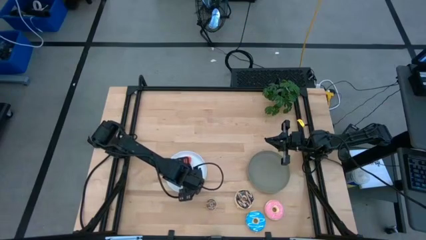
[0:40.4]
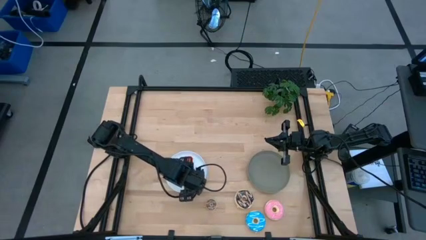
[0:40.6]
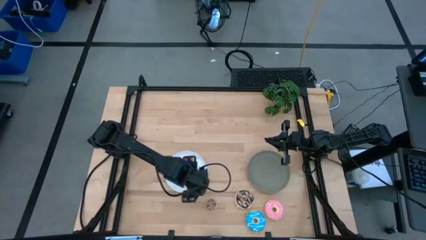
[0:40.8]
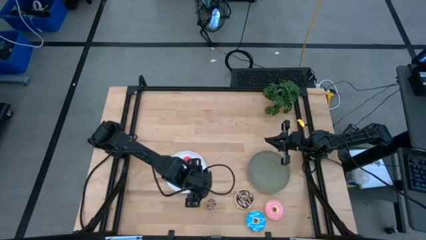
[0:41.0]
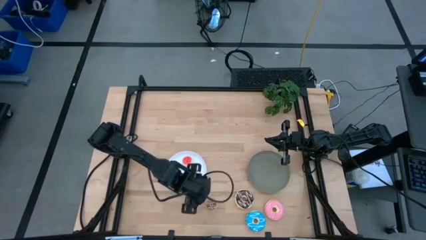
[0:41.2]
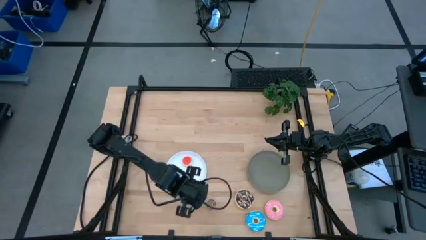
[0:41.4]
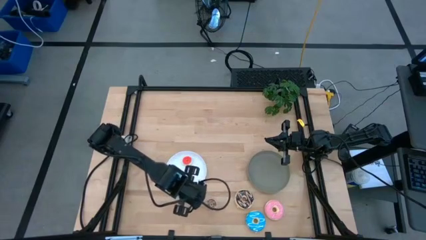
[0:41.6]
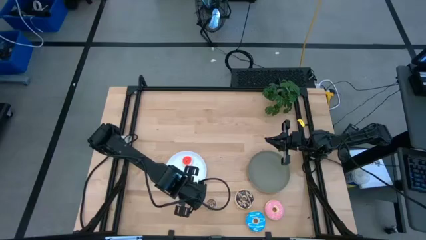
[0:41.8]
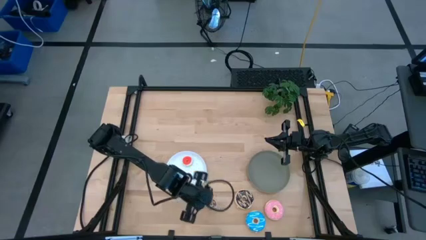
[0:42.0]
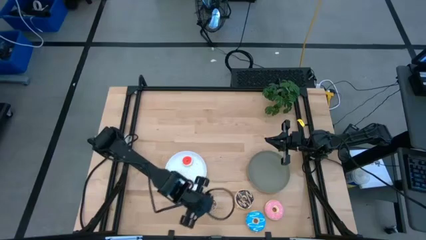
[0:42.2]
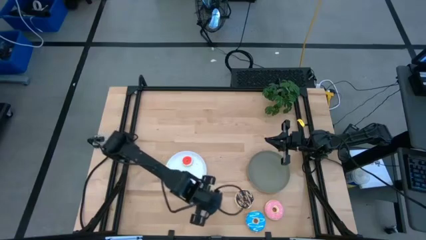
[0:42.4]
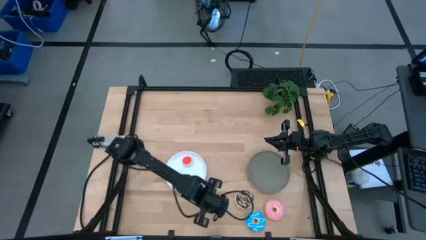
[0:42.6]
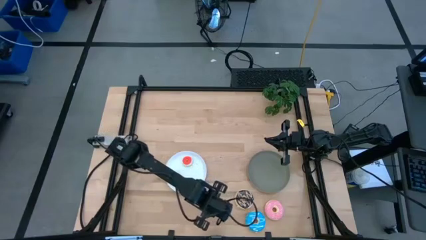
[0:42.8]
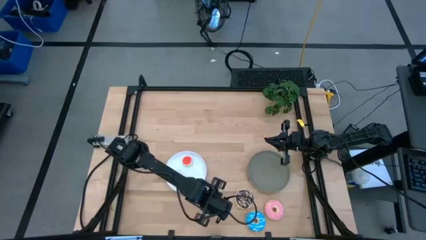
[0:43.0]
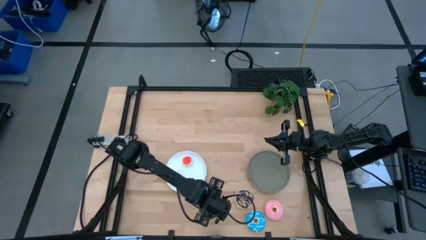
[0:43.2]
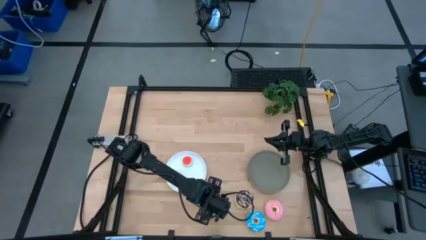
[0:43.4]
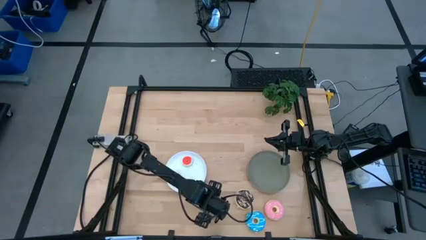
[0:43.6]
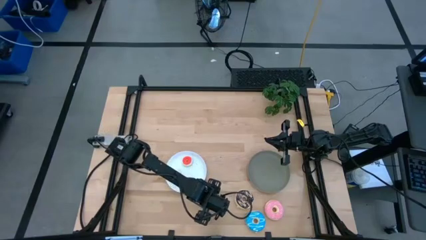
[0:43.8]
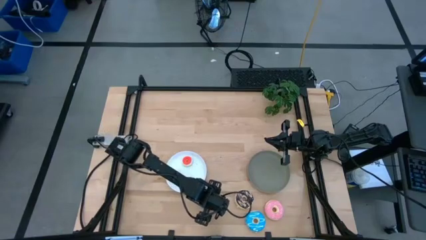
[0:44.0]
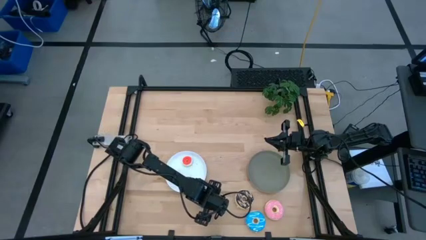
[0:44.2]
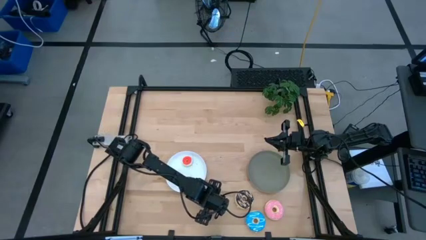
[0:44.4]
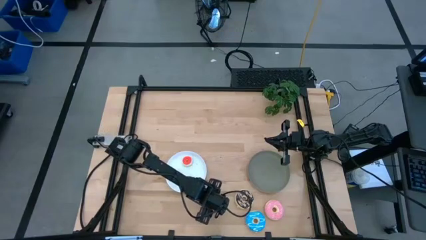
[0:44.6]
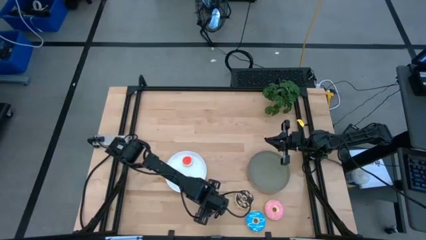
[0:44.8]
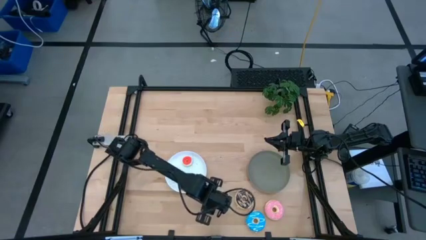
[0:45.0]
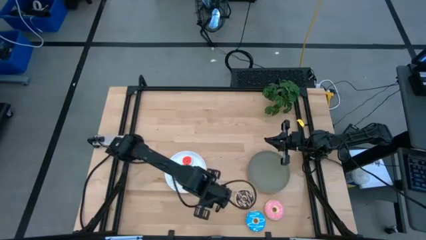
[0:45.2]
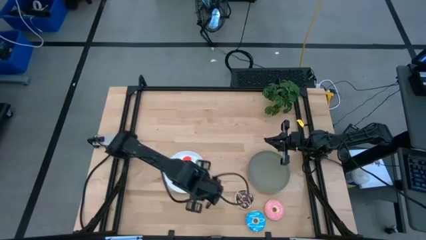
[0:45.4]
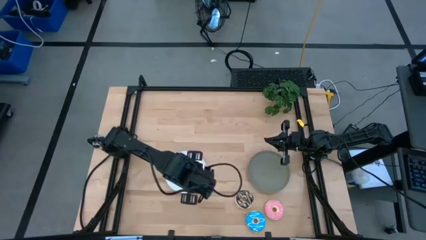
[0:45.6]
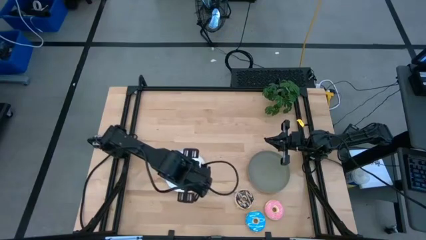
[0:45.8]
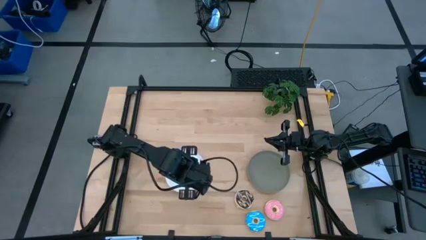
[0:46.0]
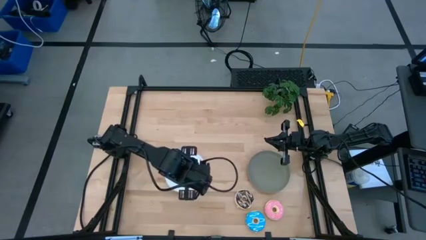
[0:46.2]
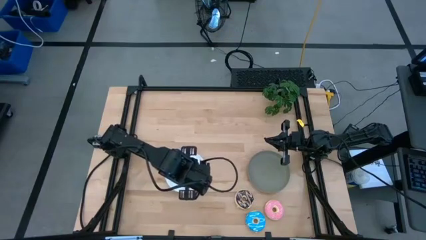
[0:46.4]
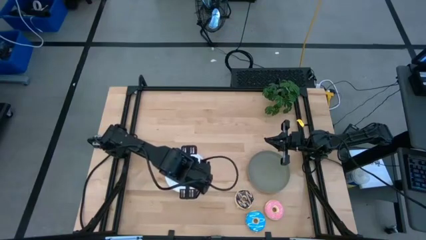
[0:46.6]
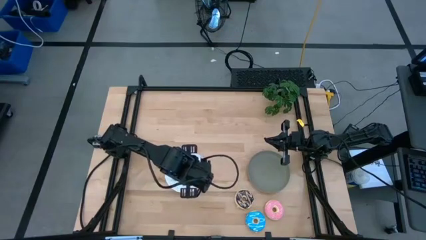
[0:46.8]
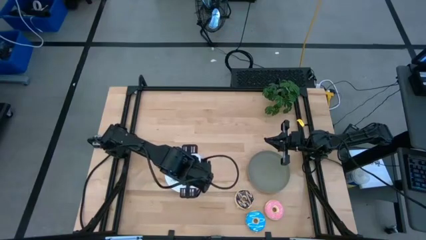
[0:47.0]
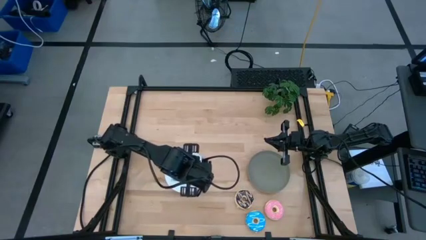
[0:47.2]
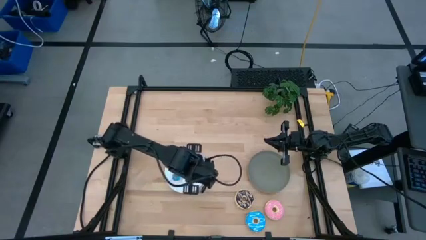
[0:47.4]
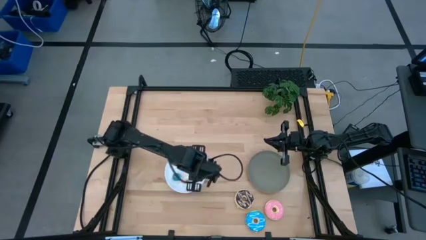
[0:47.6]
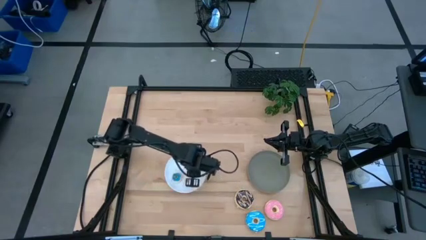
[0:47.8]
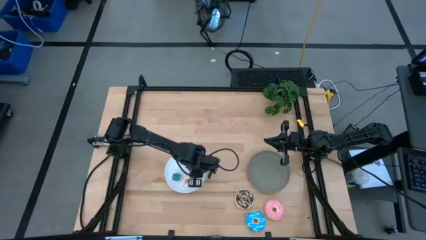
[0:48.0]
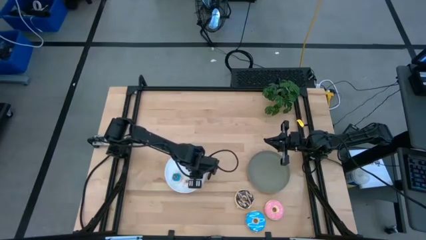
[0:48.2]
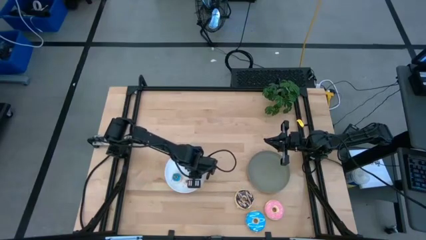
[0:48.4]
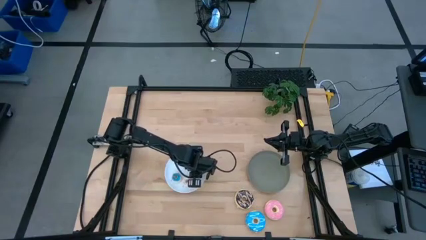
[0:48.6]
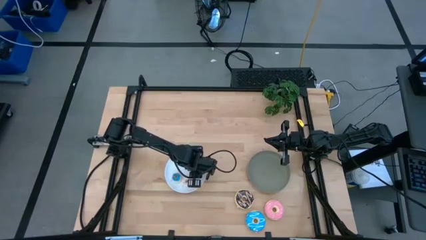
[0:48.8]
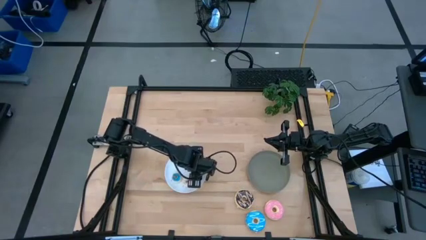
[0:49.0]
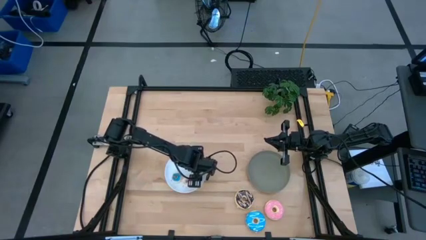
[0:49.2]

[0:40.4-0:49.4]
Task: Pick & Place donuts
Put the small brown donut on the white plate

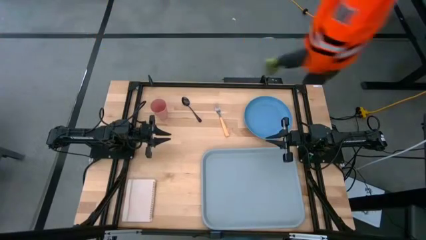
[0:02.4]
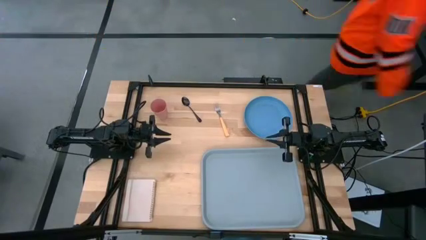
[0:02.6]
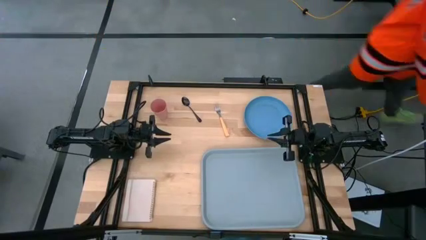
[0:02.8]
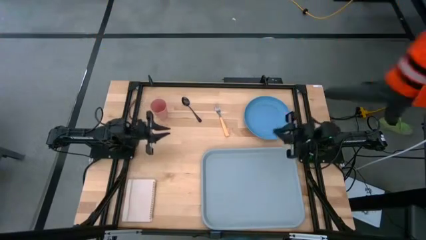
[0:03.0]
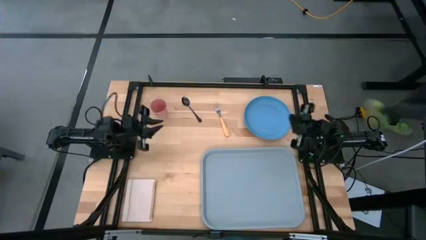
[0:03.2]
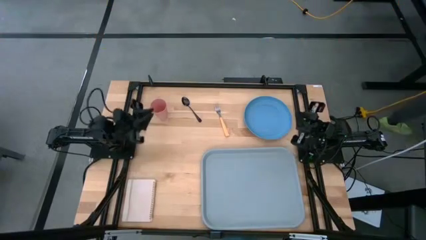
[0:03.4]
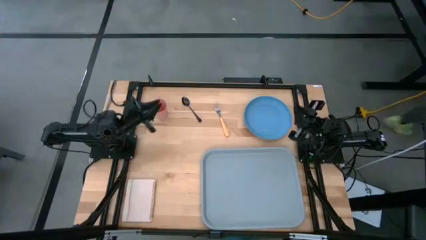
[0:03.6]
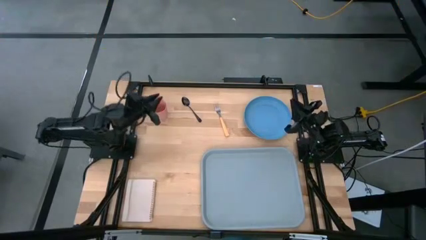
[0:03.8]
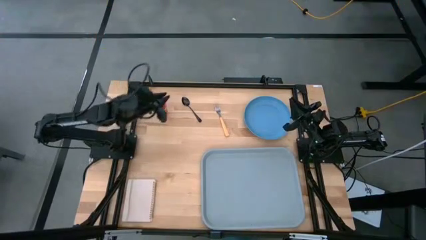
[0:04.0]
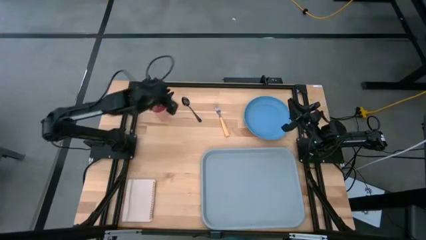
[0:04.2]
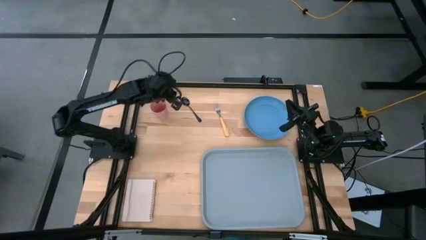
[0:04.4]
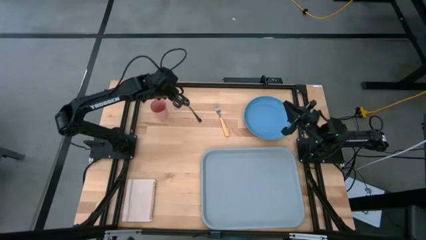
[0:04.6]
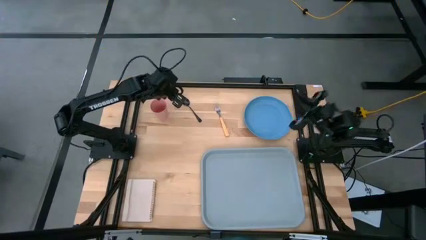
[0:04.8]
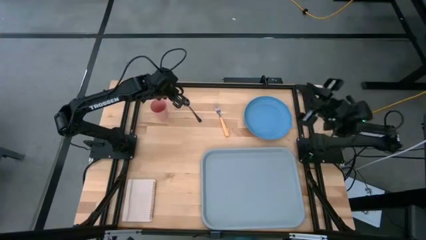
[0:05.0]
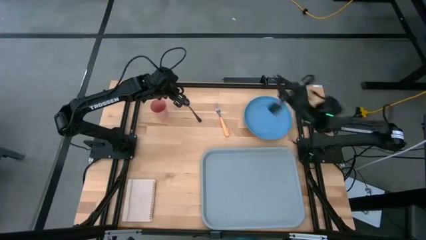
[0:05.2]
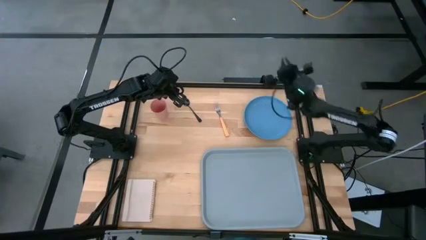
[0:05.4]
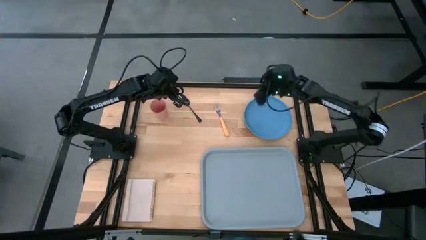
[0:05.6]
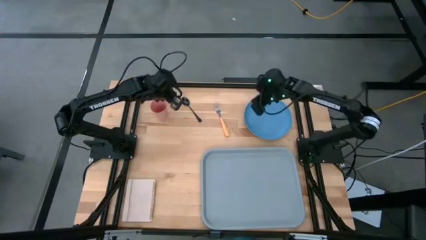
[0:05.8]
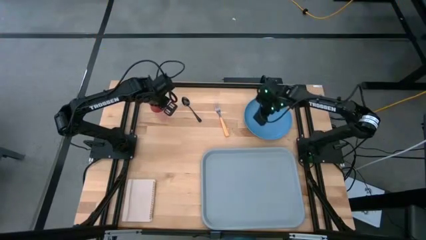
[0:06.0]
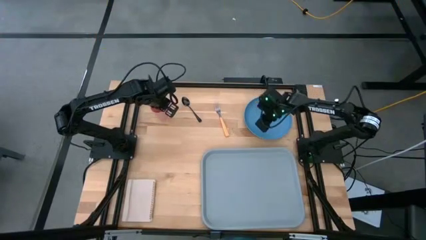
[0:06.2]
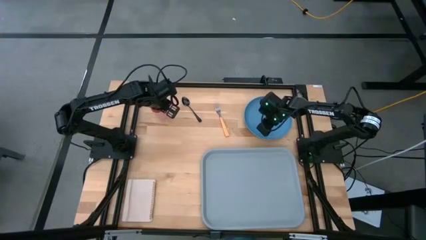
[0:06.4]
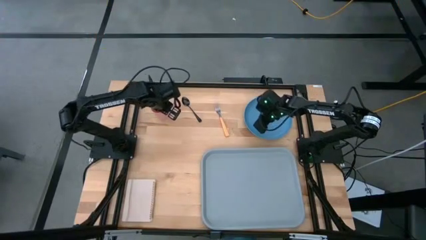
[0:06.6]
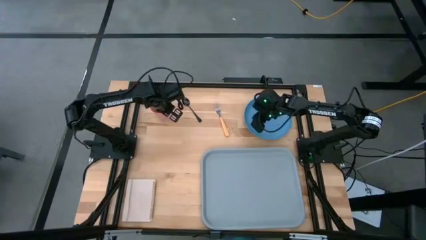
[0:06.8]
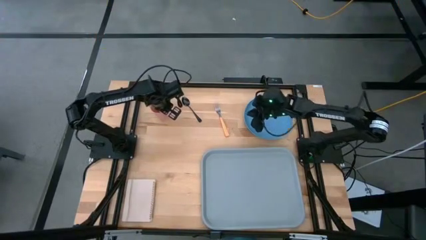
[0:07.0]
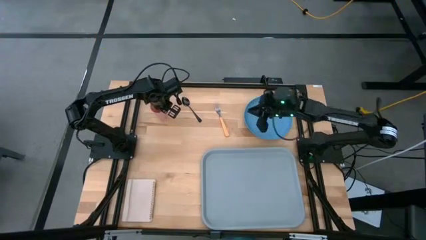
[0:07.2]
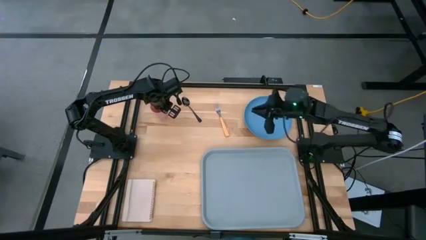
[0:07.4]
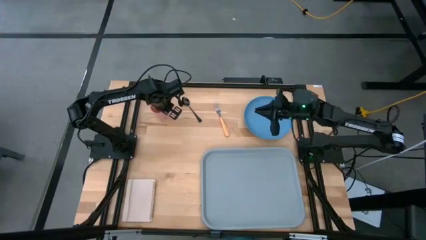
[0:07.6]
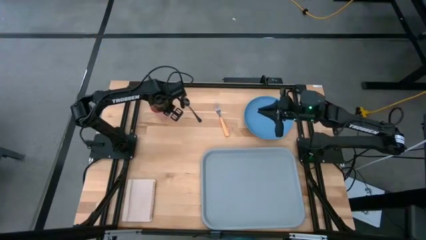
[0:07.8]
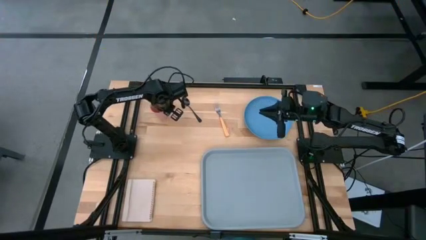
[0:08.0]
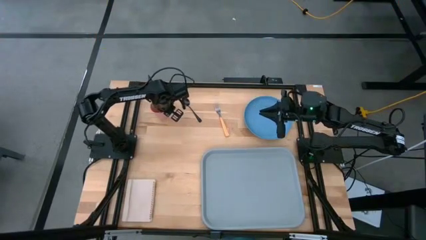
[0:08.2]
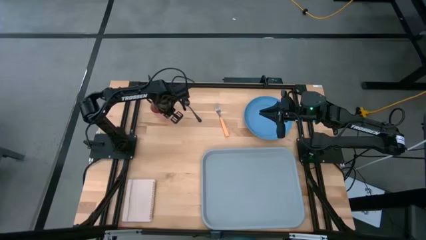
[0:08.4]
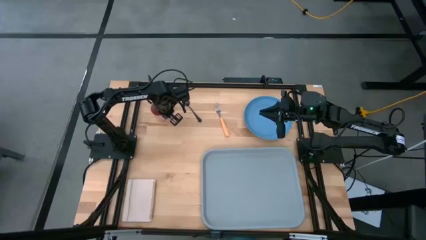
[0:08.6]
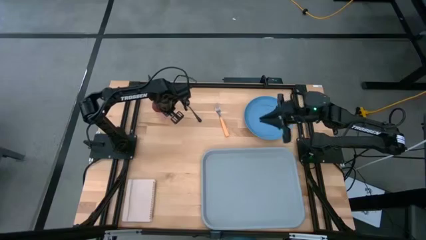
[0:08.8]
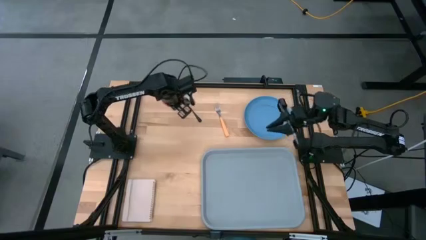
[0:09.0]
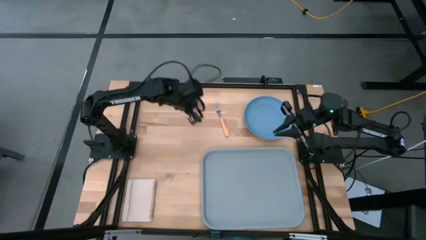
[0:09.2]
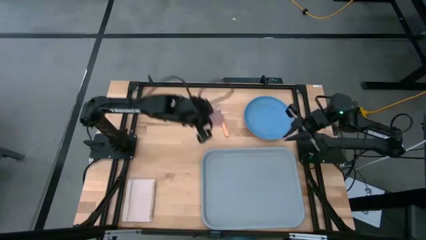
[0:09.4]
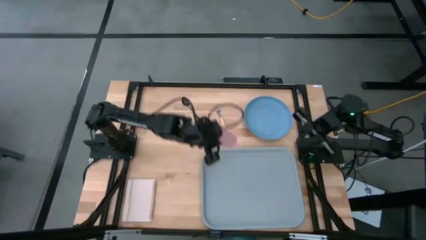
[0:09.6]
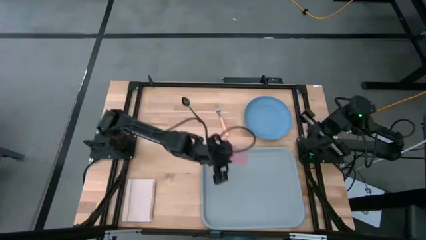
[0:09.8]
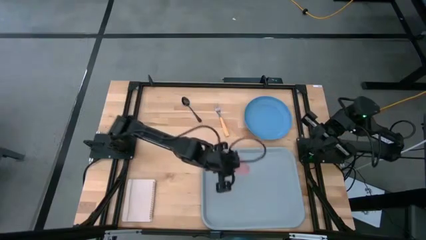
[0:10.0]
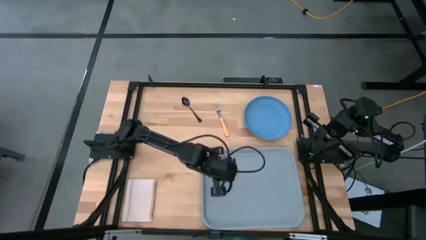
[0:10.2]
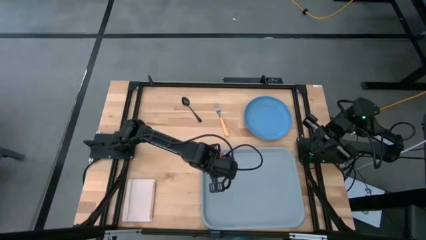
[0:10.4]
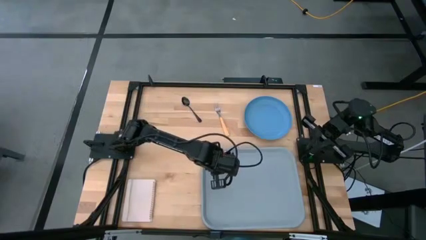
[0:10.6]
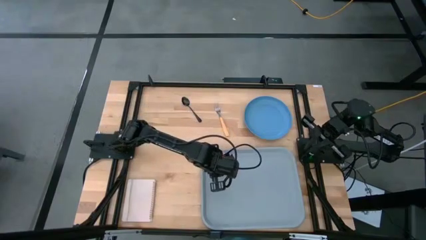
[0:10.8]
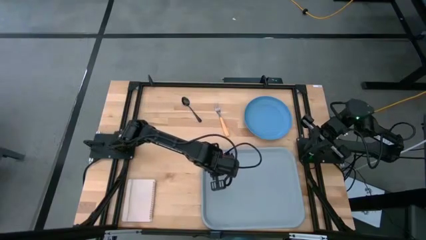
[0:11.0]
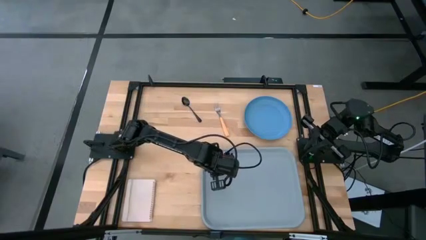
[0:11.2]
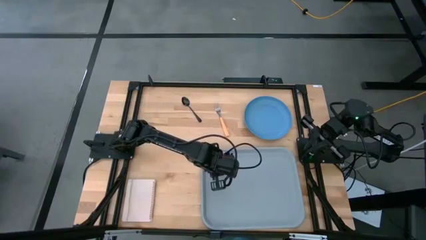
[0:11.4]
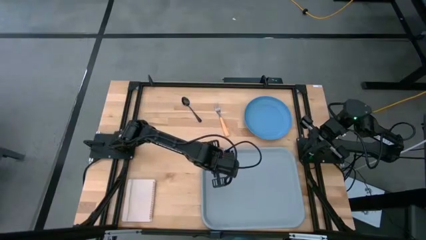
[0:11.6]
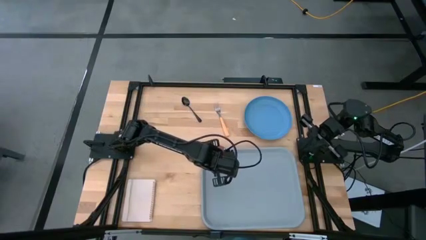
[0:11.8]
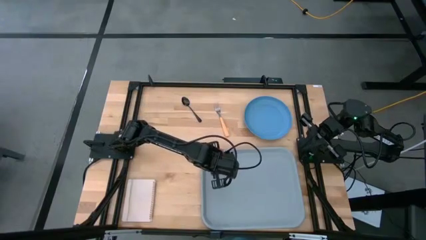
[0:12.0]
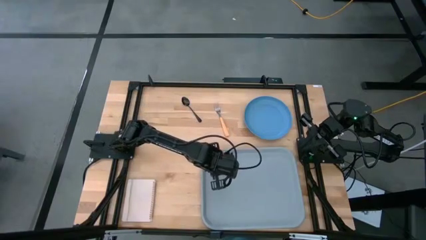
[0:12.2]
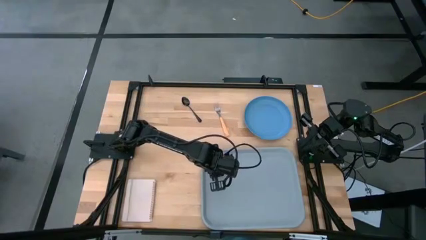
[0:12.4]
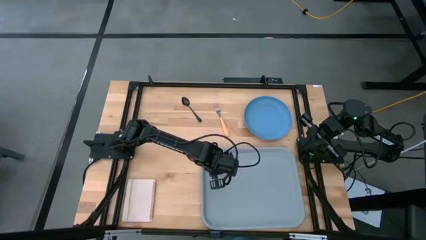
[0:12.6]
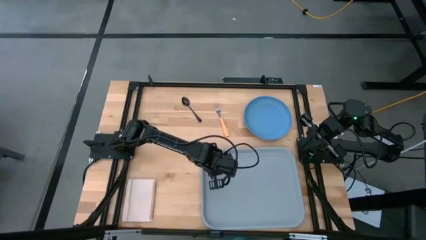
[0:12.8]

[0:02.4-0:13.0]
Task: Pick and place plate/cup/fork/spoon on tray
Put the pink cup on the top left of the gray tray
